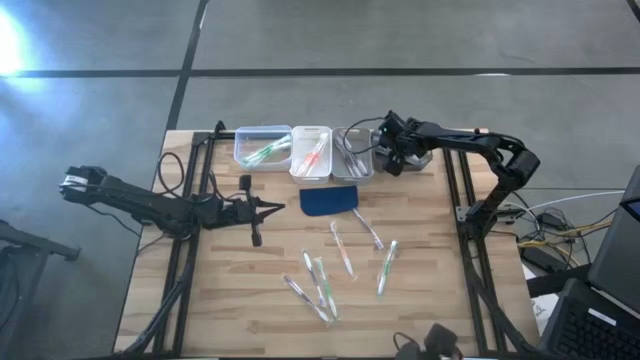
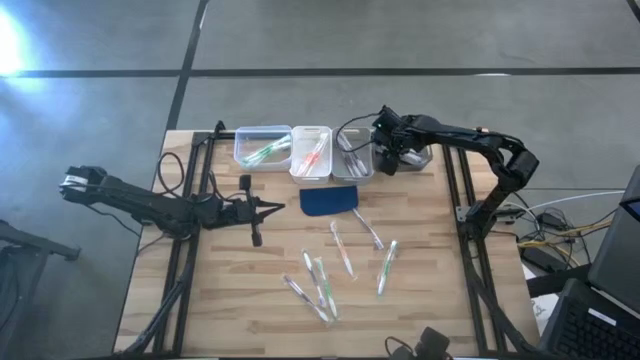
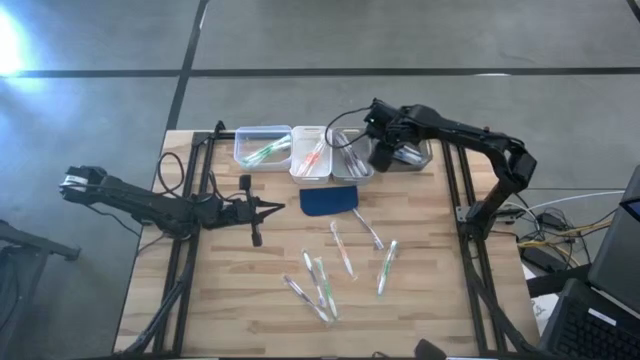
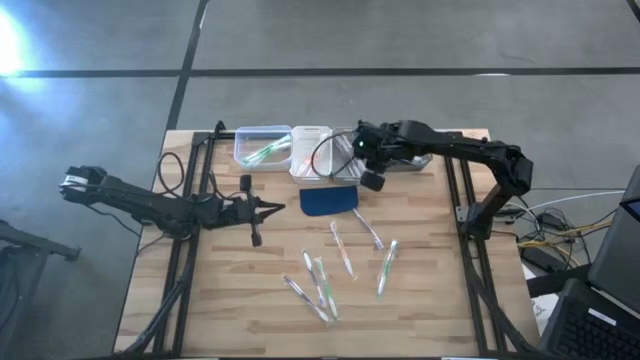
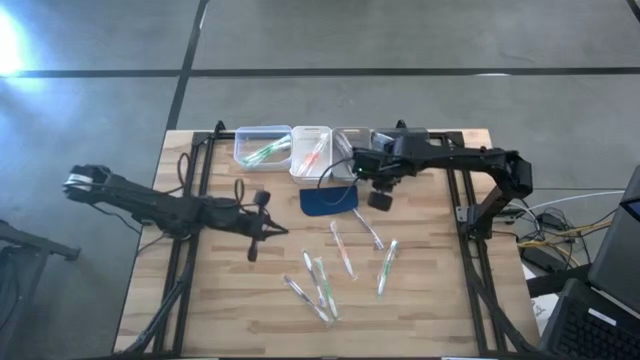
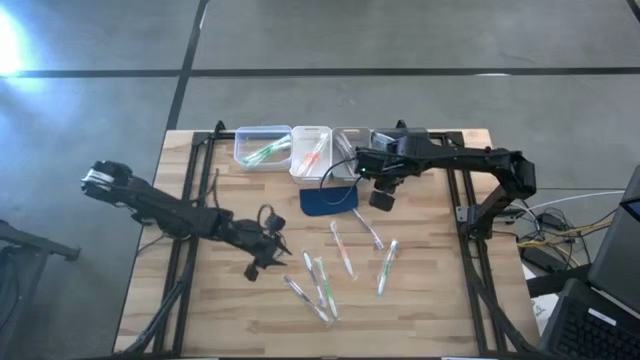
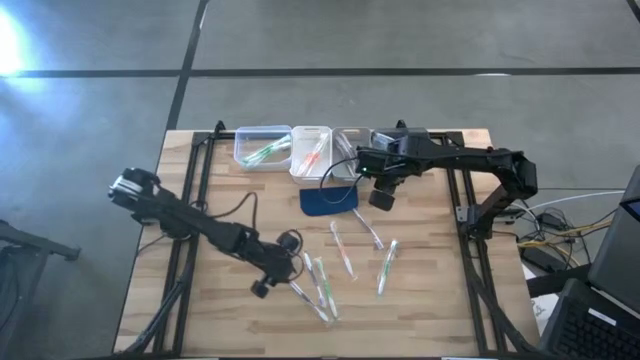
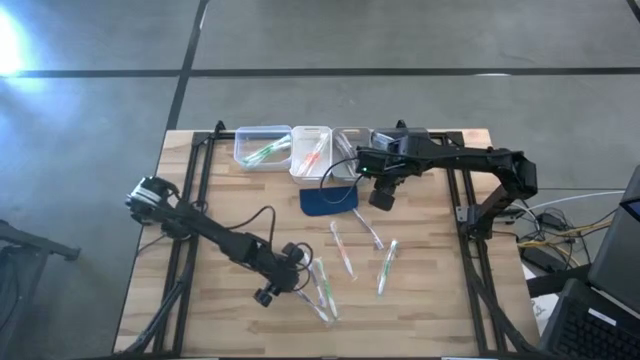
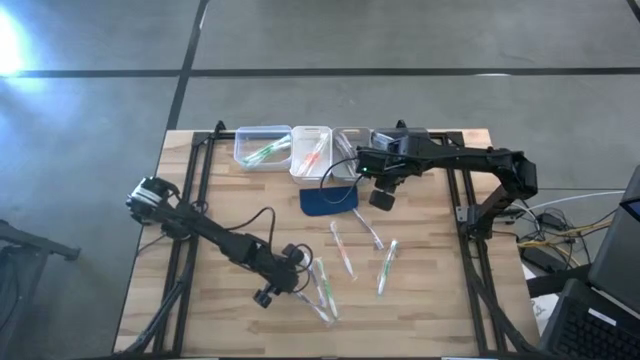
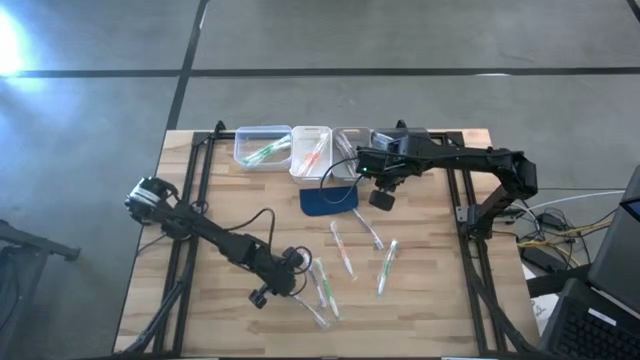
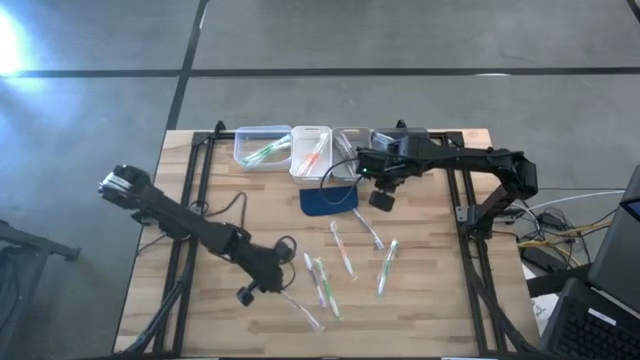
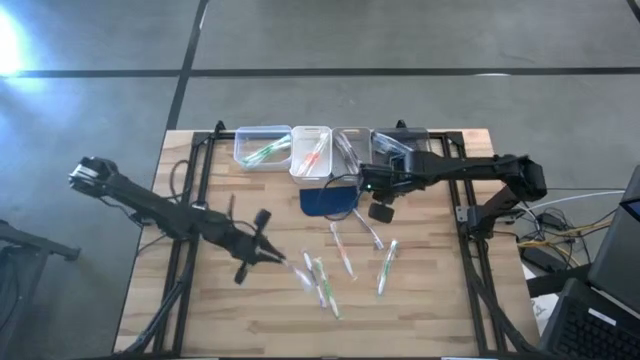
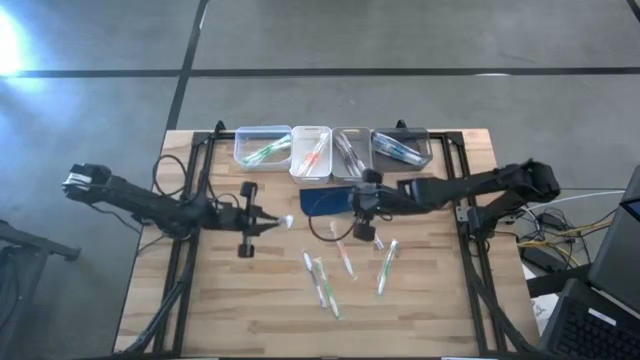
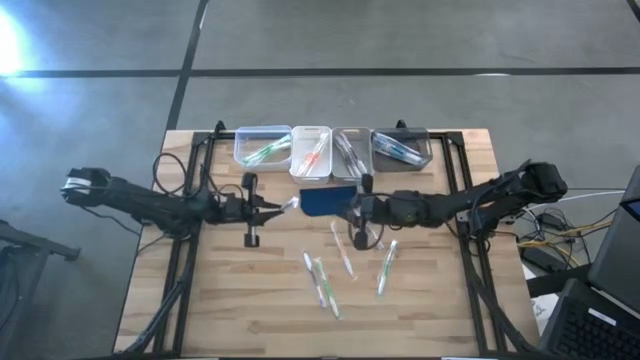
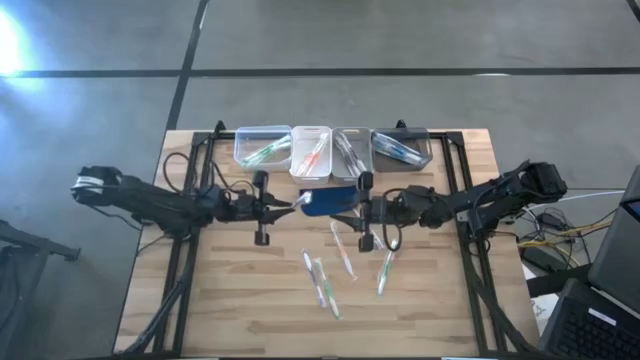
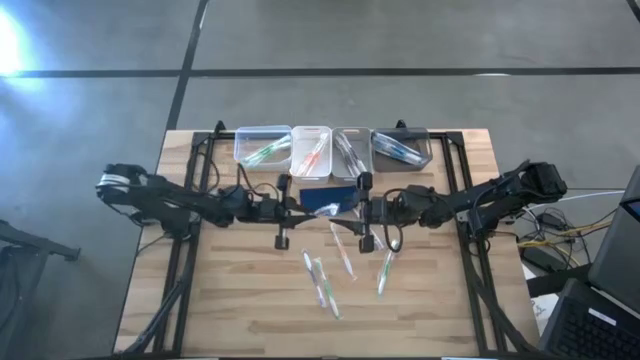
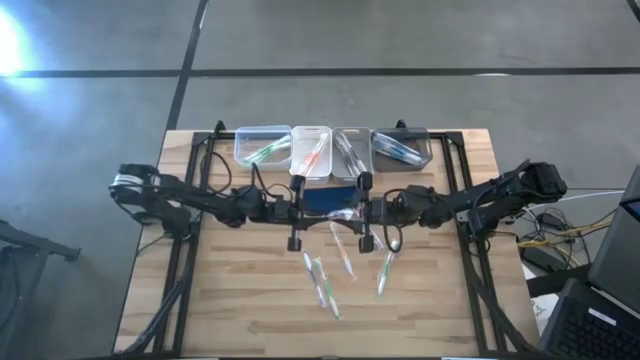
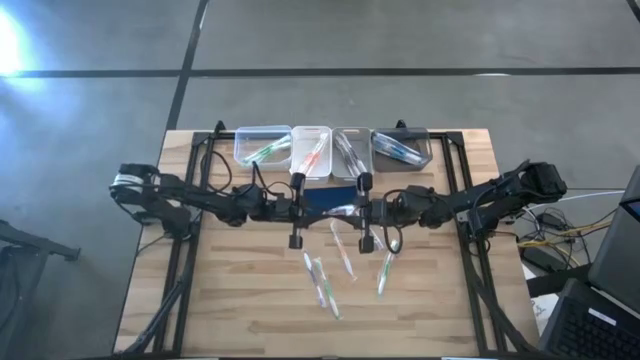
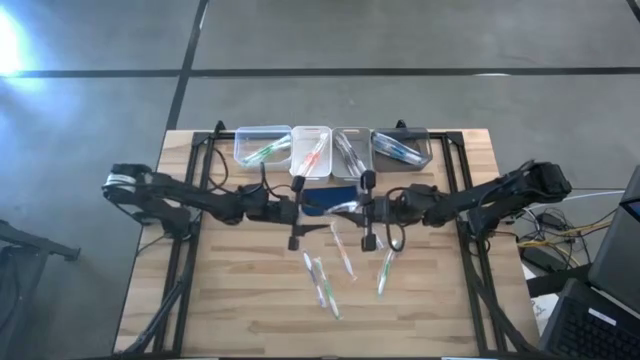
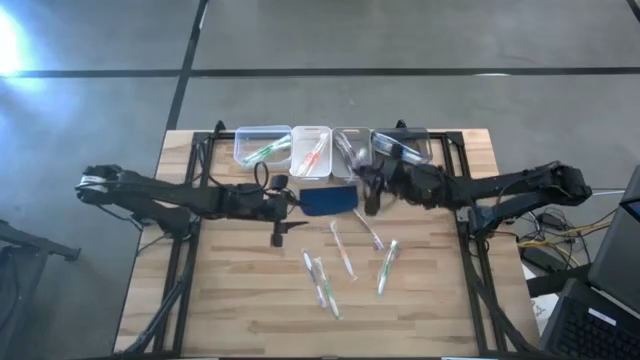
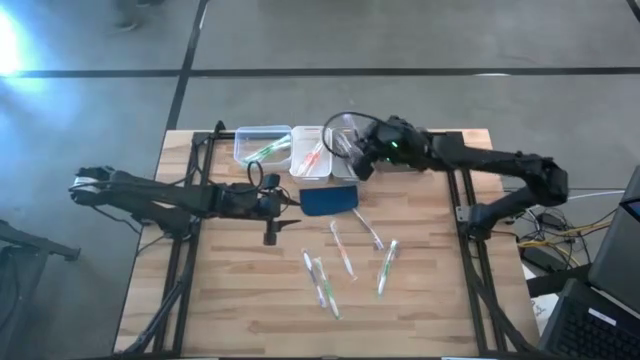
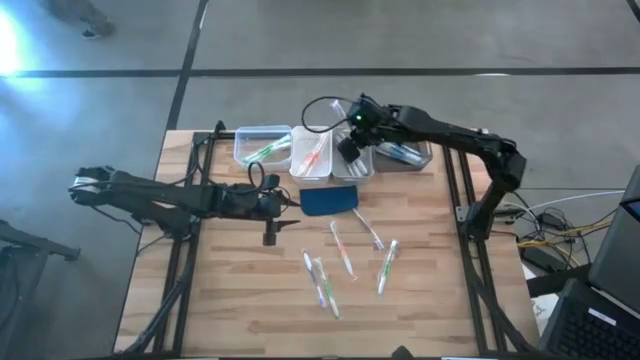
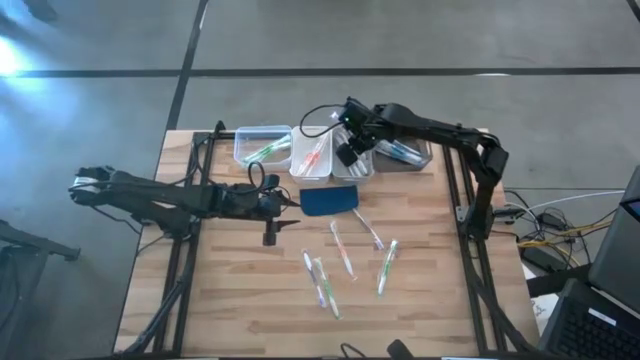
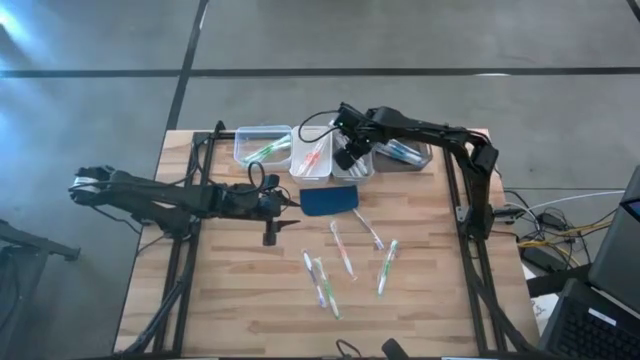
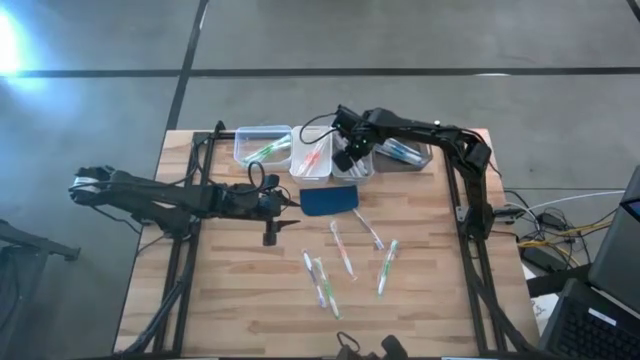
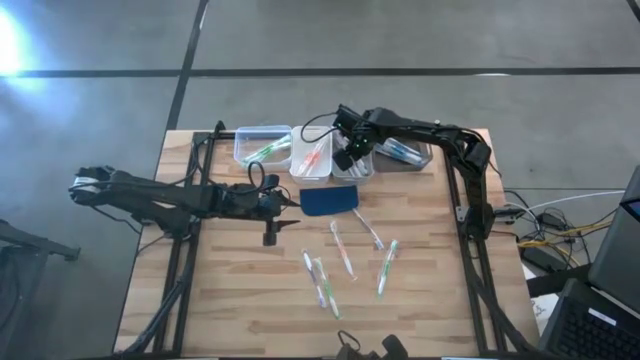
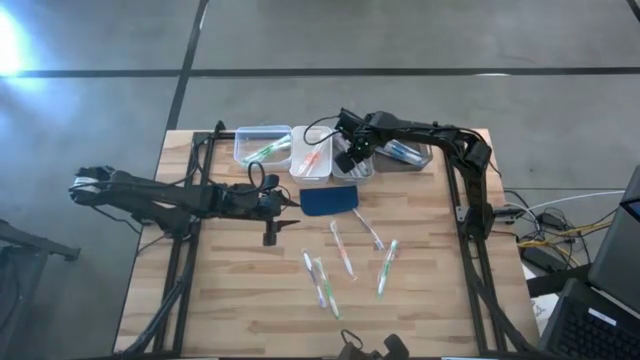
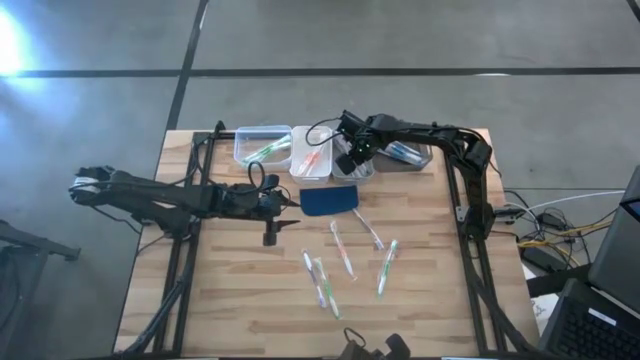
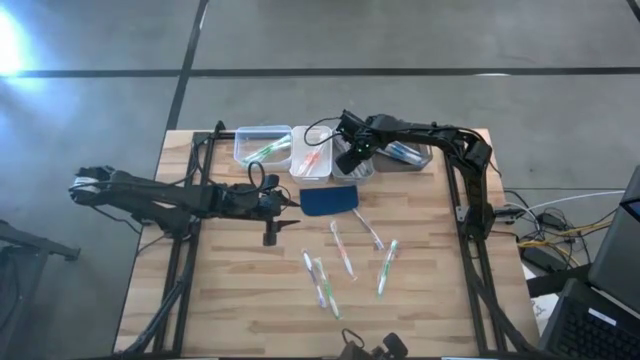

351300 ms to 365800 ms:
Task: Pick & Place Toothbrushes
Put the violet toothbrush into the gray bin

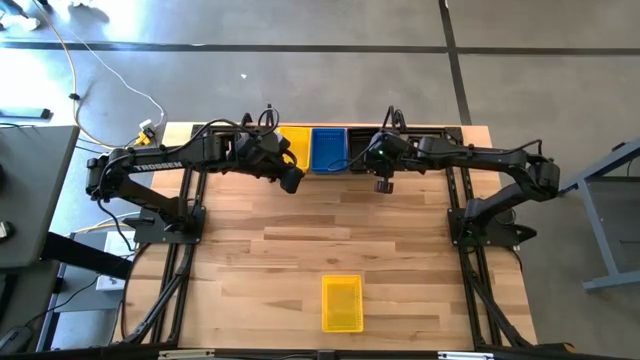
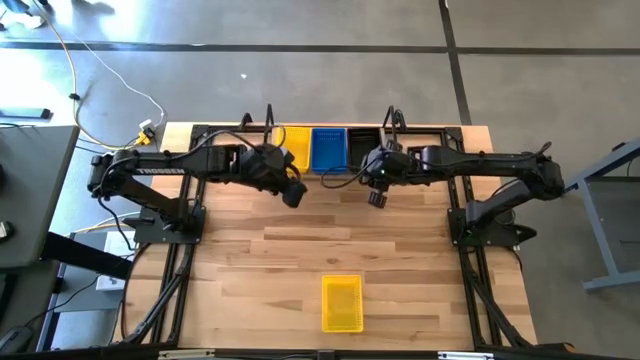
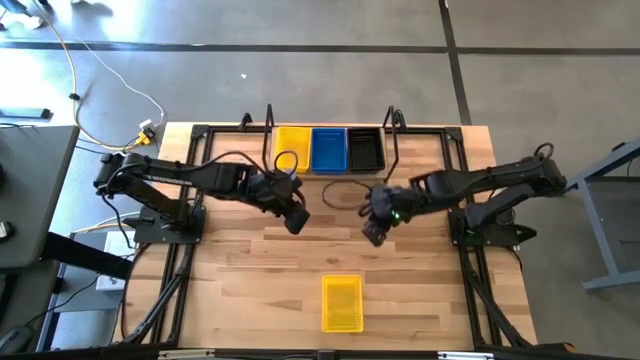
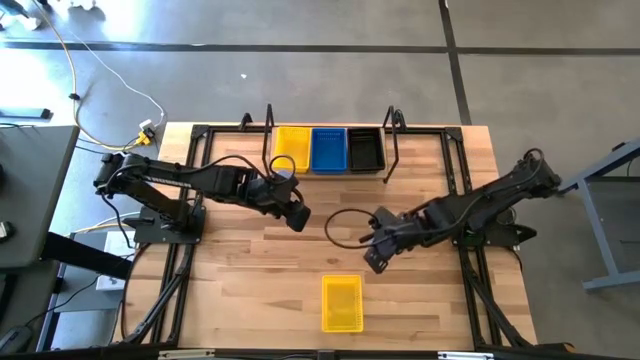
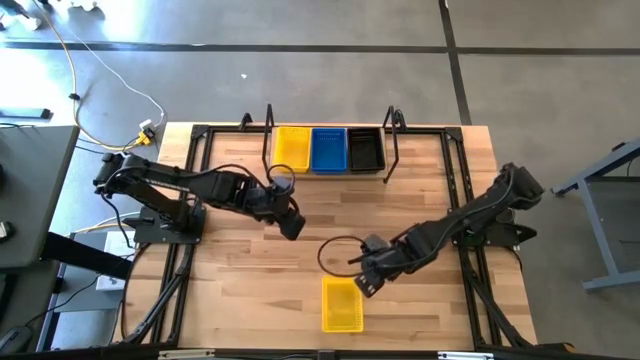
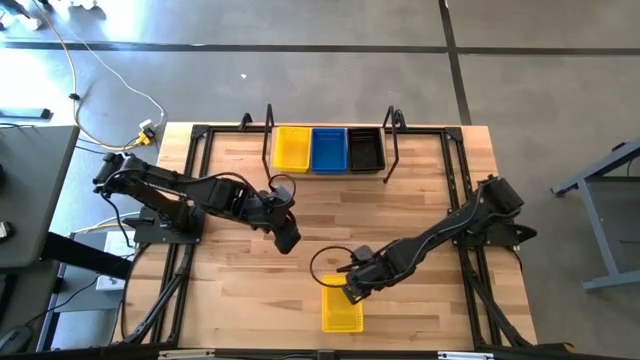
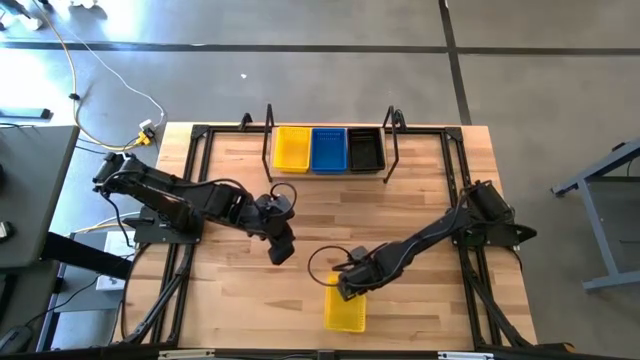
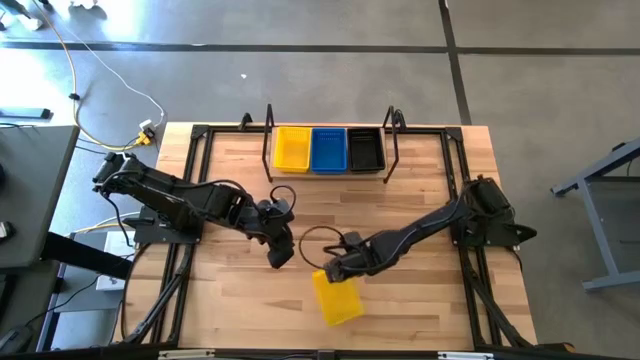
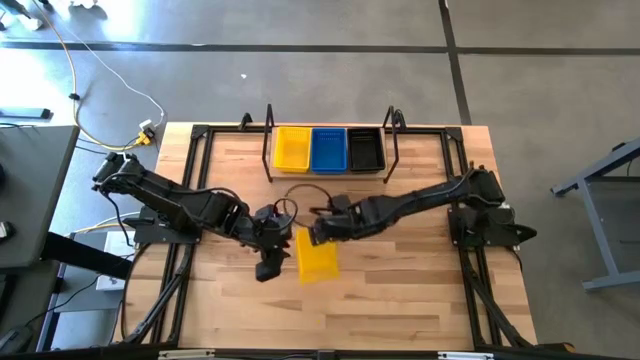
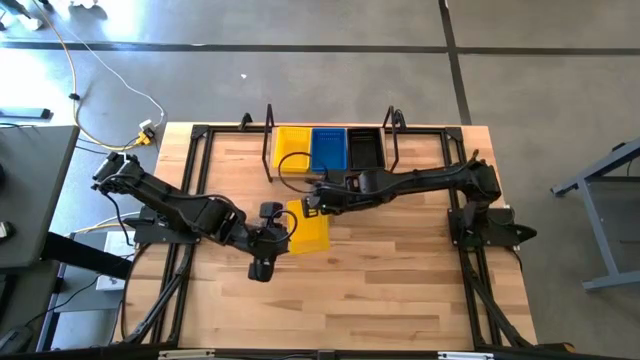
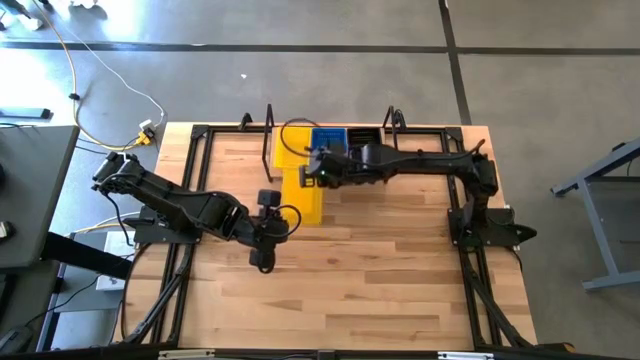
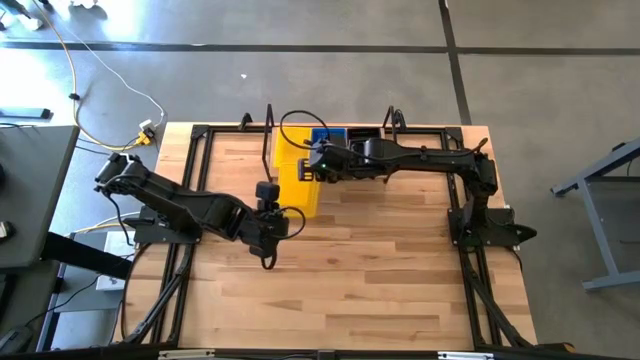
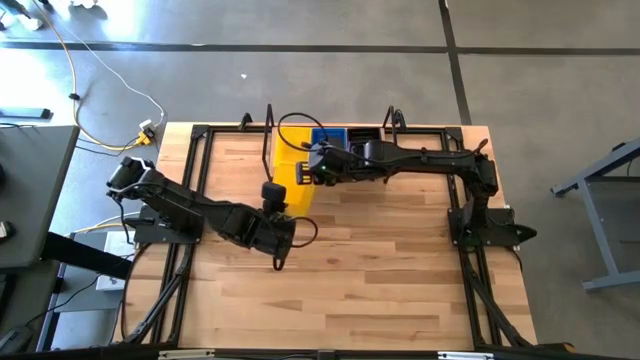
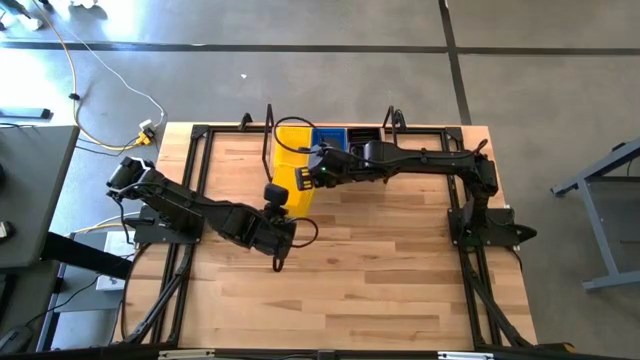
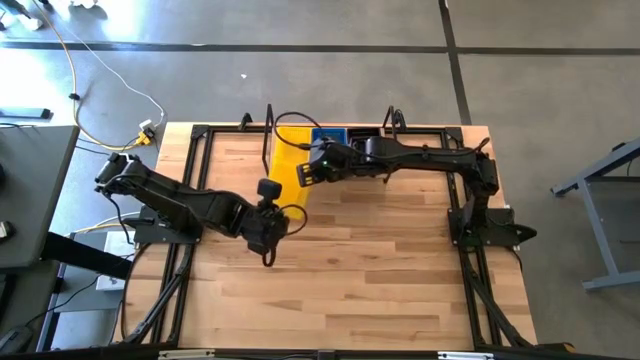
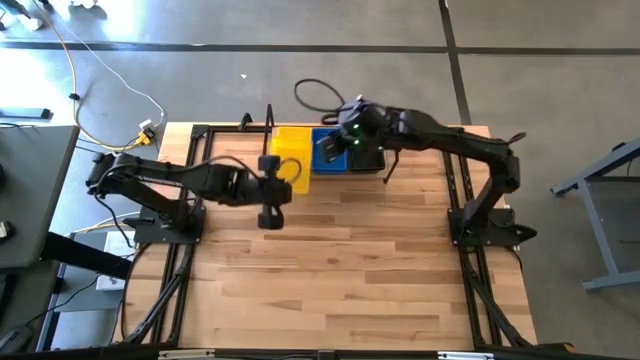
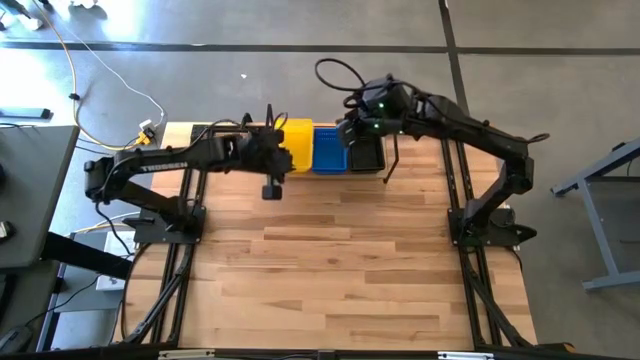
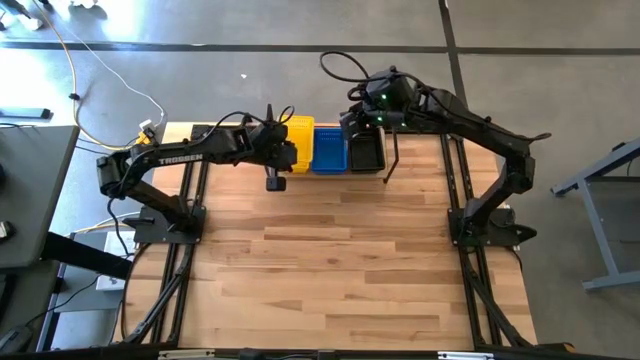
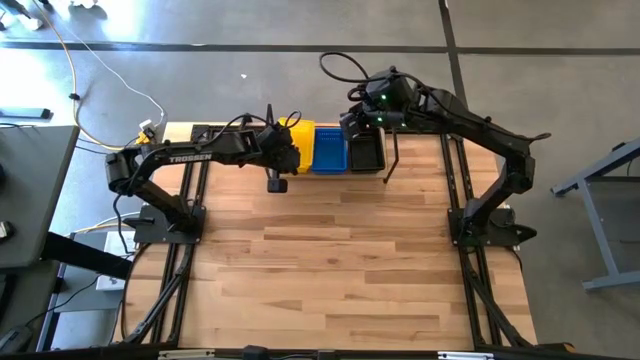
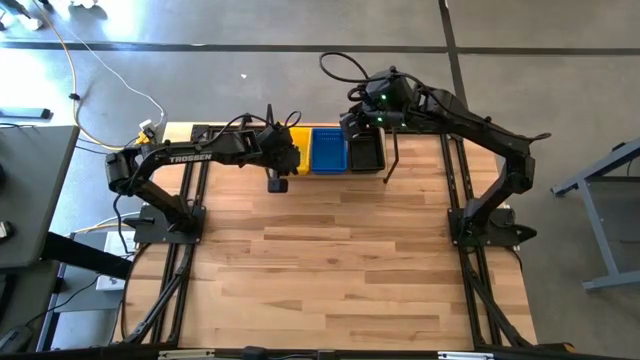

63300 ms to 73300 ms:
Task: Stack baskets on shelf by color
Stack the yellow basket on the yellow baskets on the shelf
